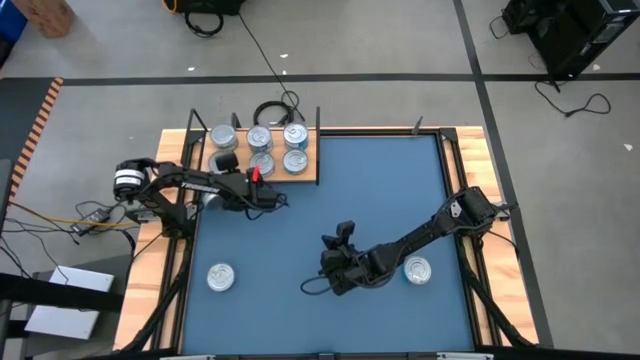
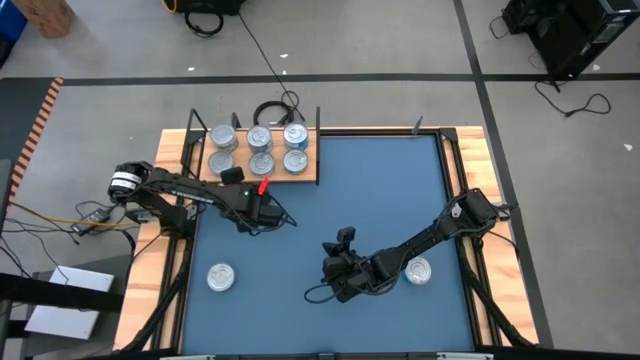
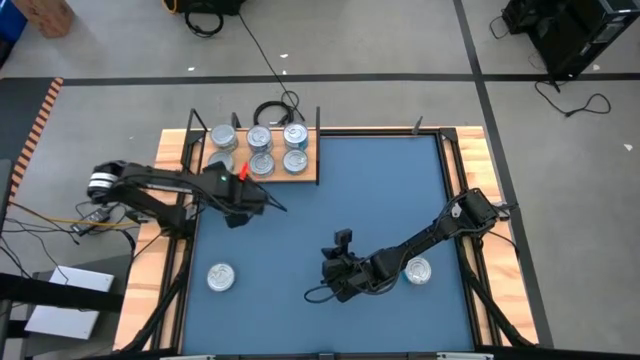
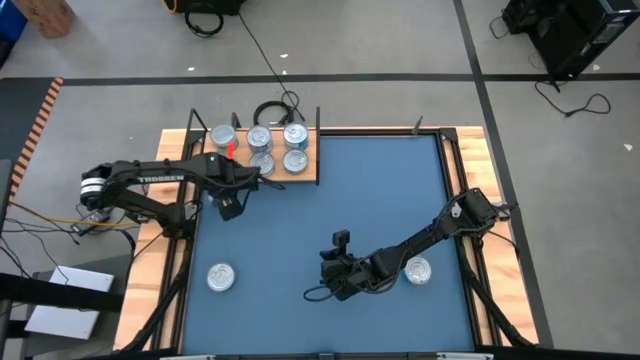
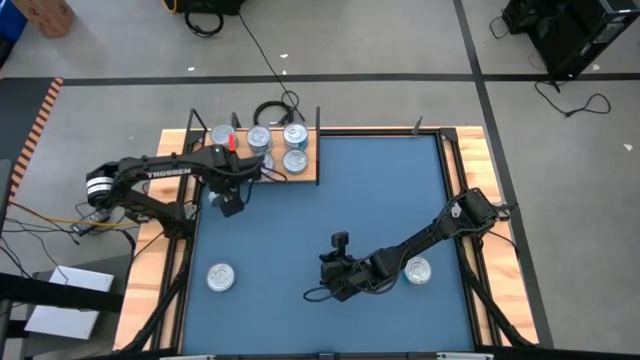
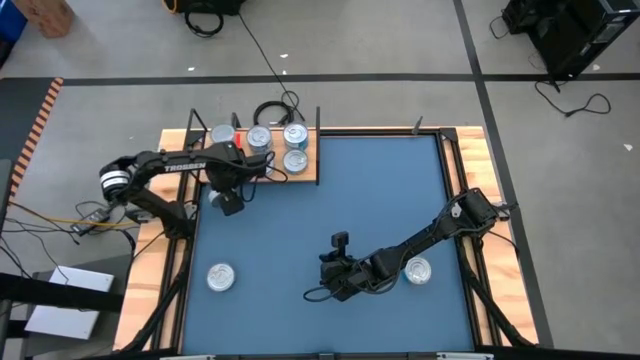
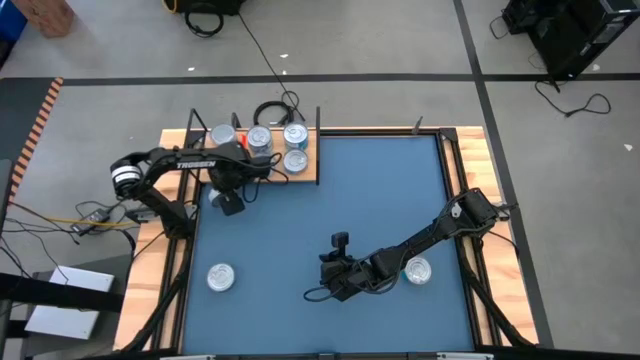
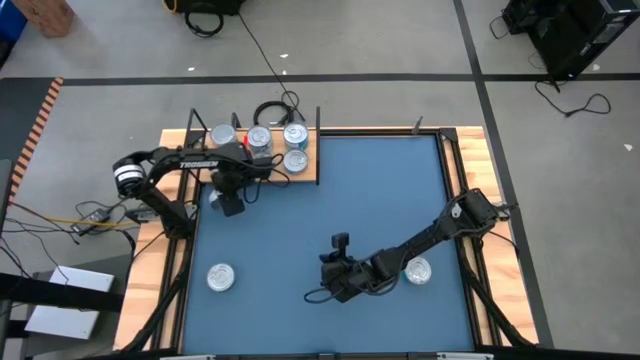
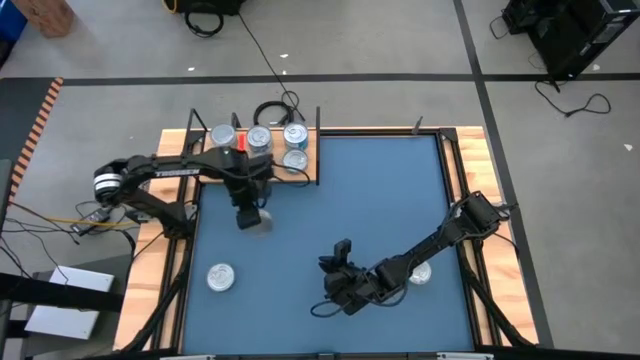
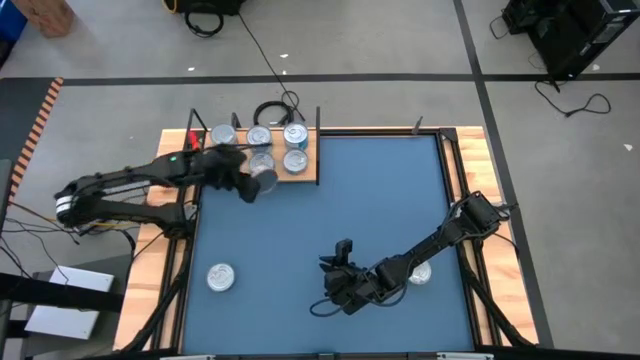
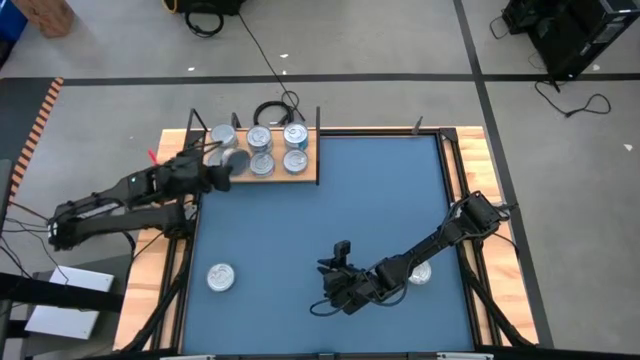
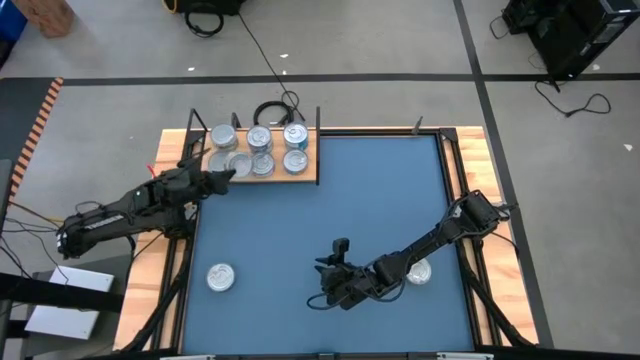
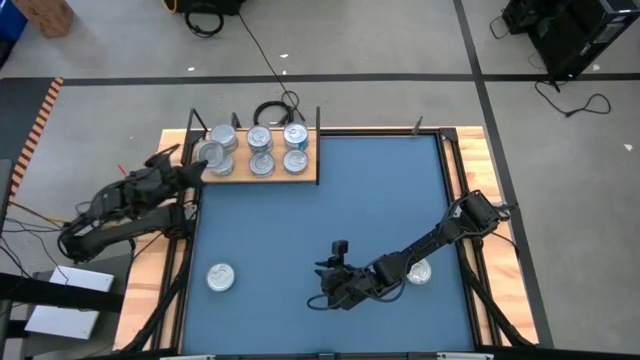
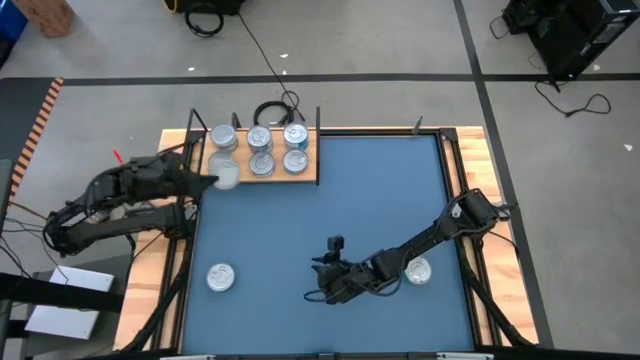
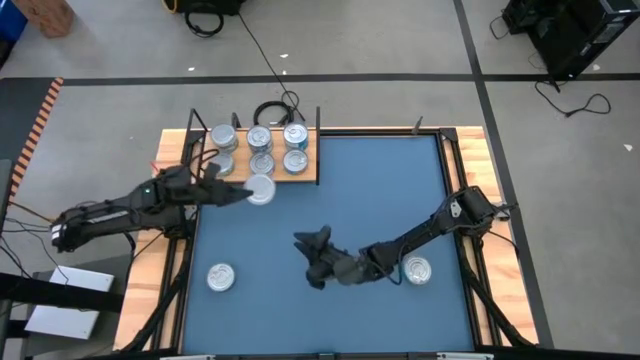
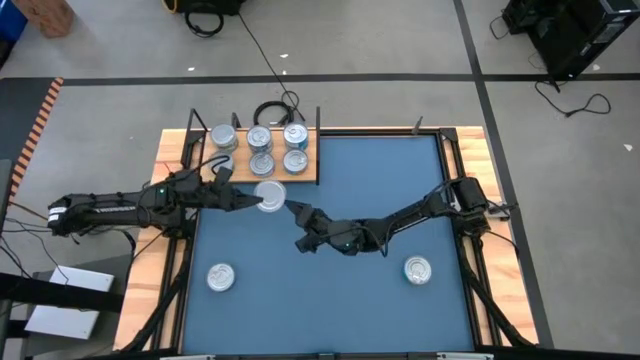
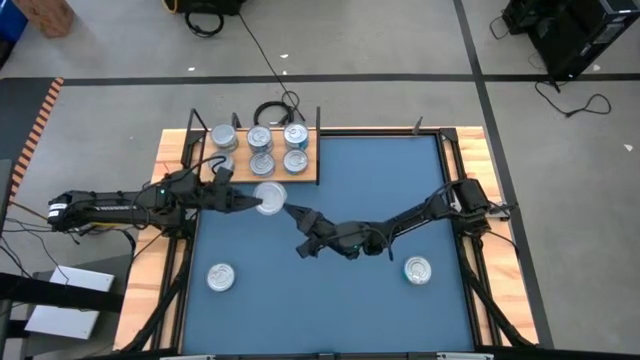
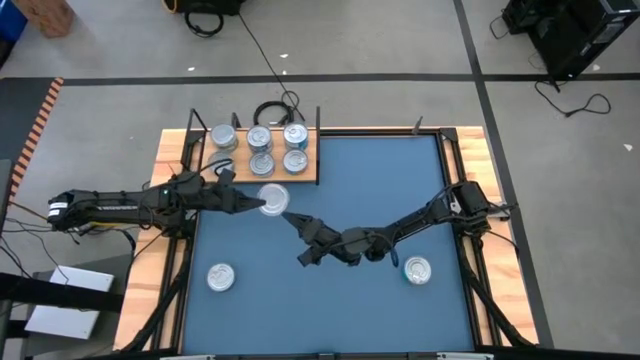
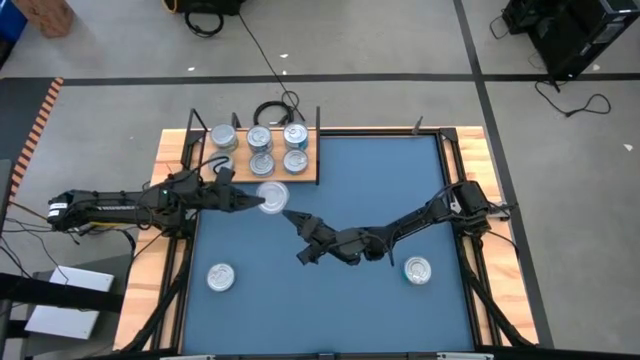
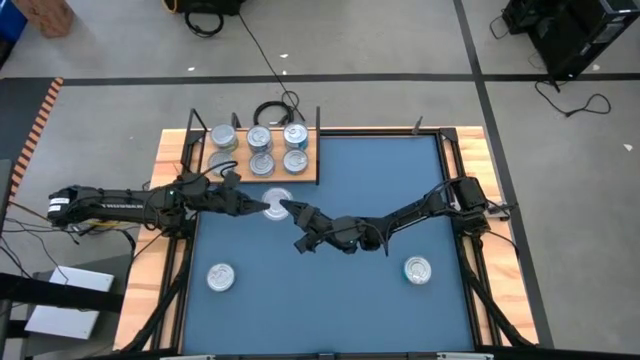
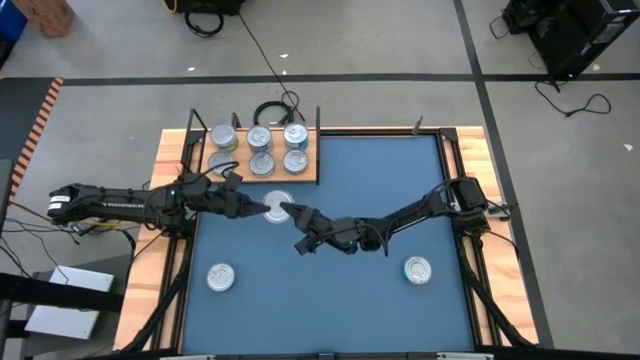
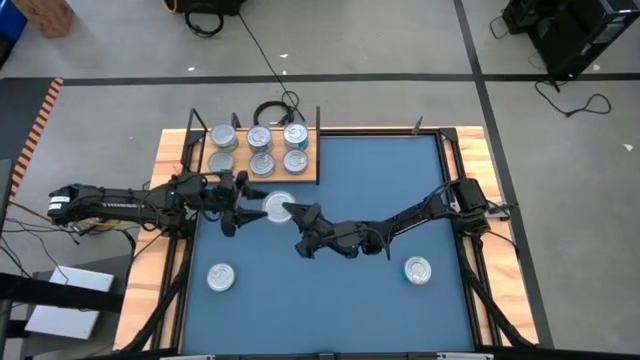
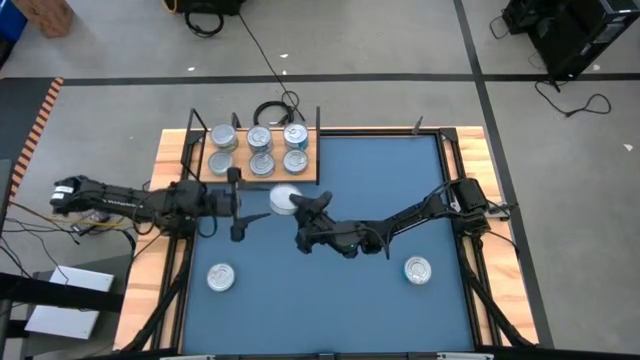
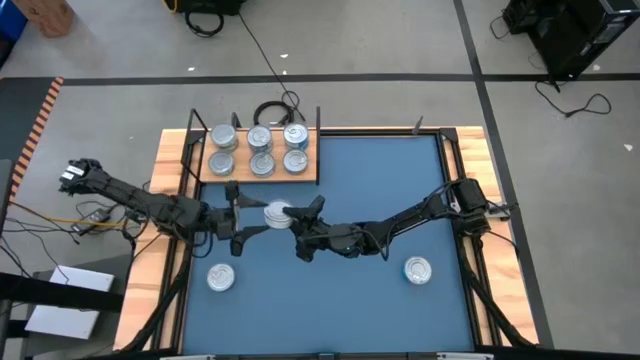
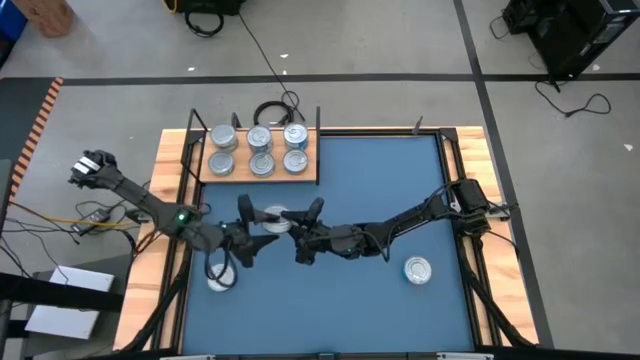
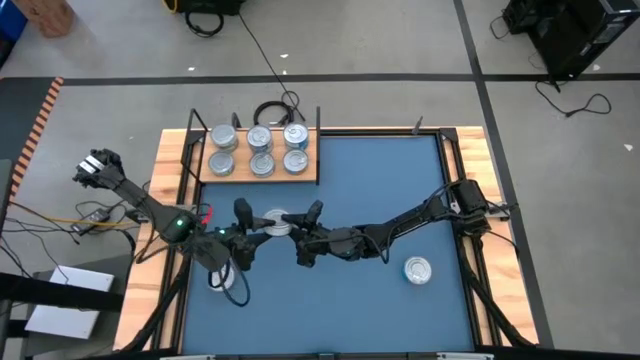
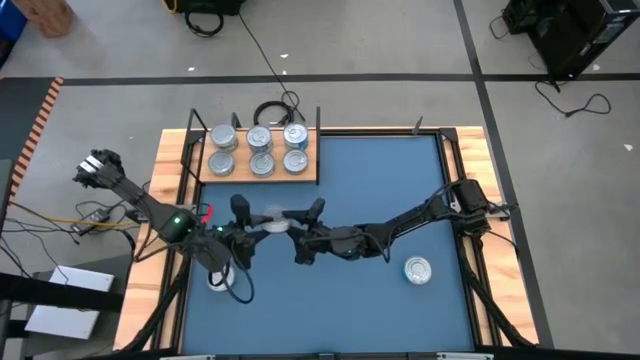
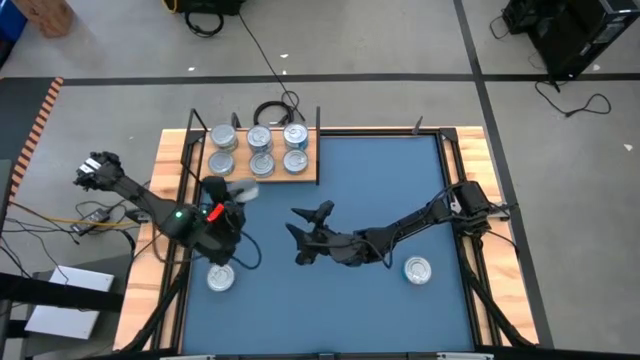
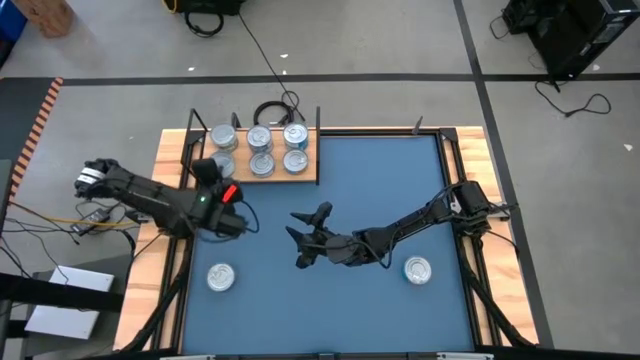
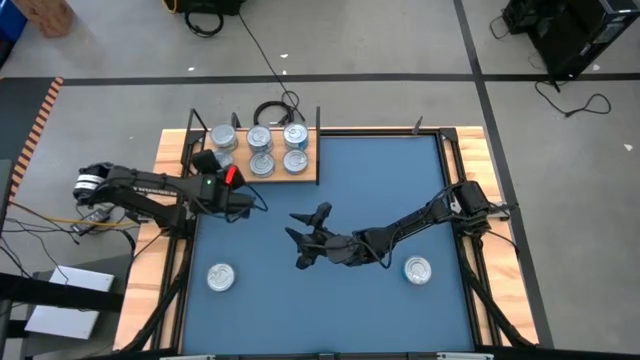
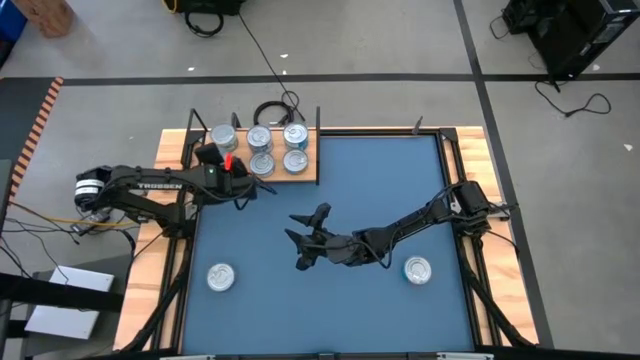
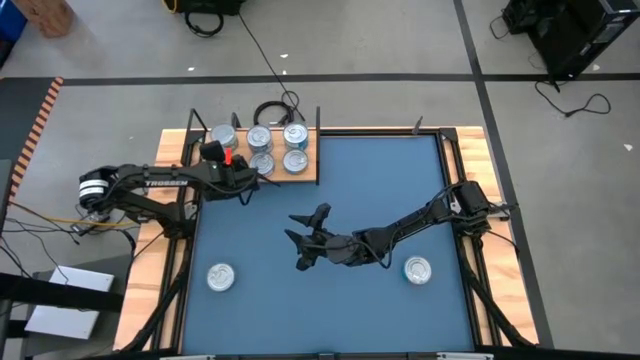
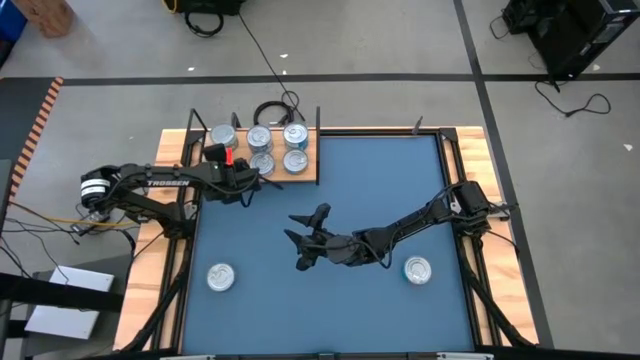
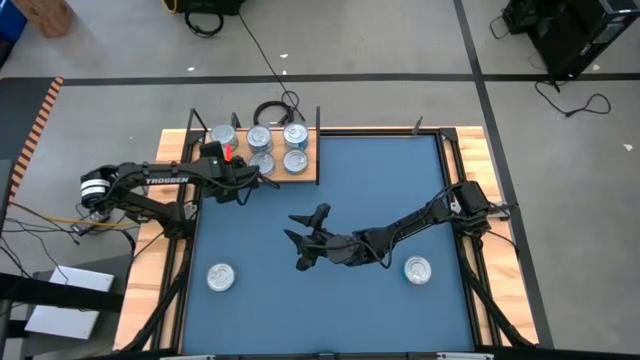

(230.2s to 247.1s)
Task: Stack canned seafood by type on shelf
Stack the green tuna can on top of the green tuna can on the shelf

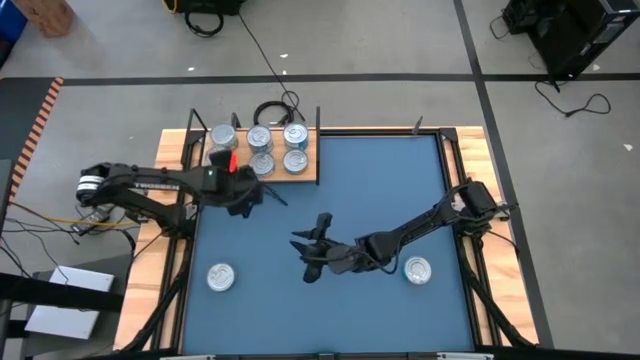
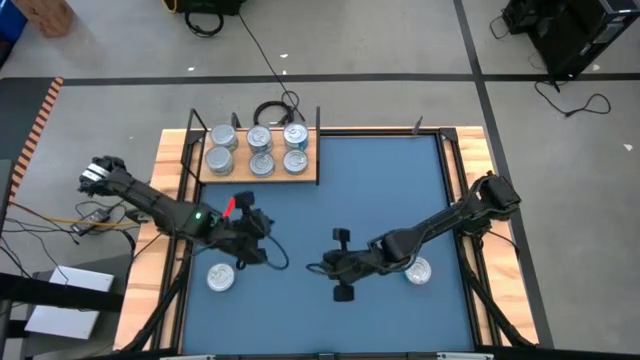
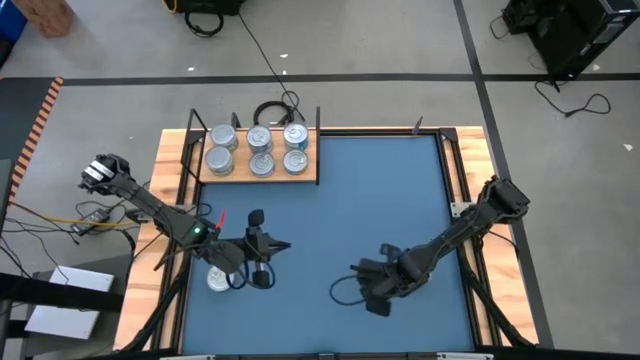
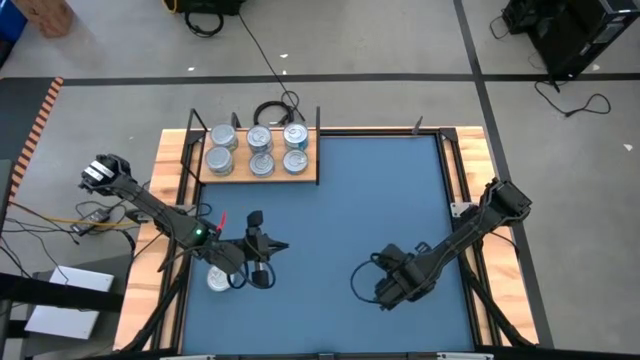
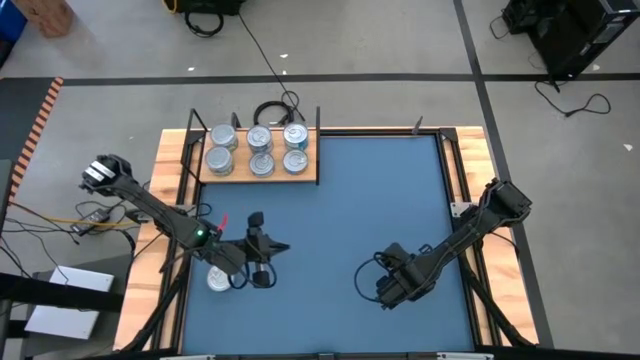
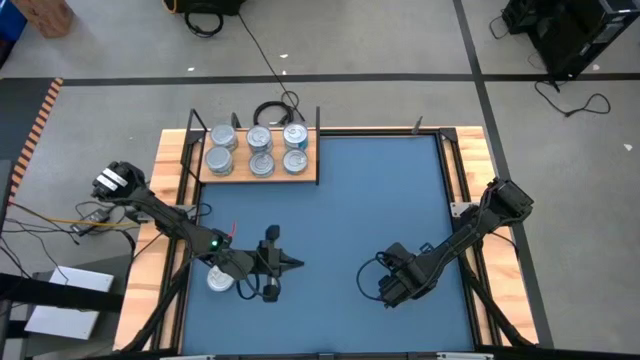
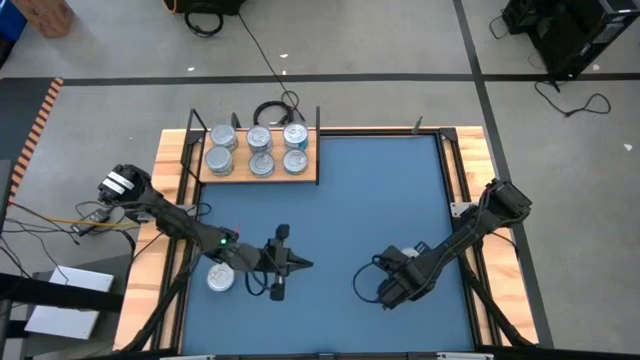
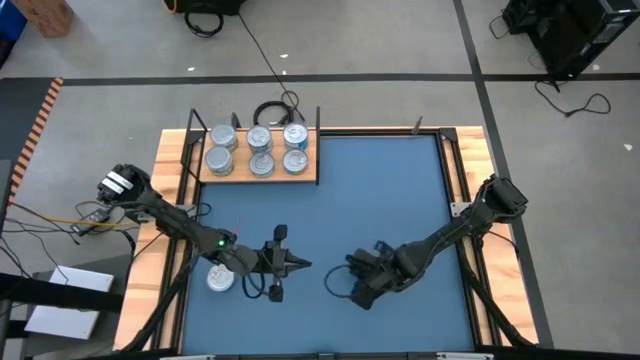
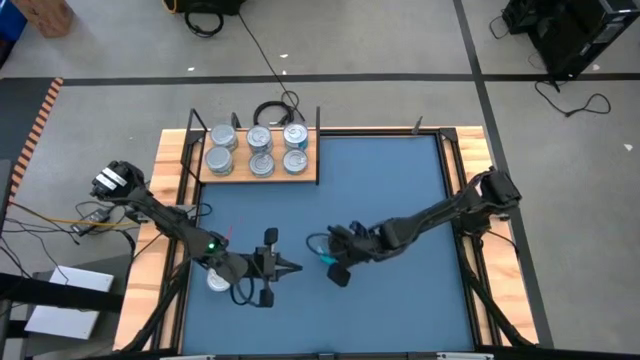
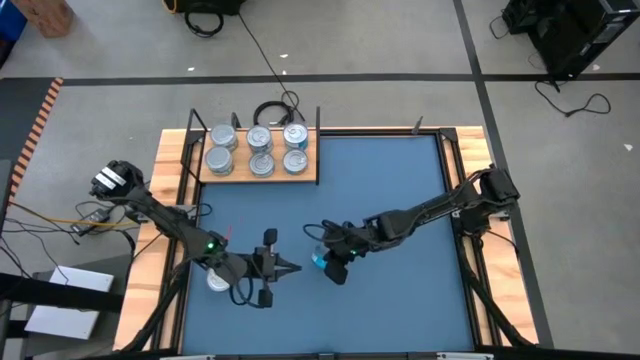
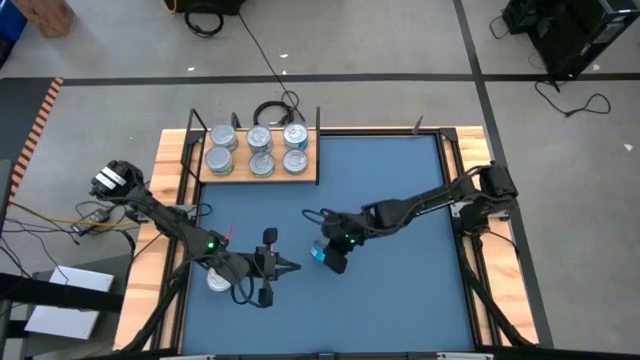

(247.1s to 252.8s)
Stack the yellow blue tuna can on top of the yellow blue tuna can on the shelf
